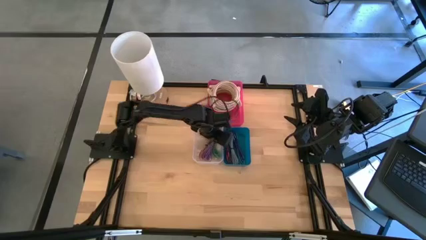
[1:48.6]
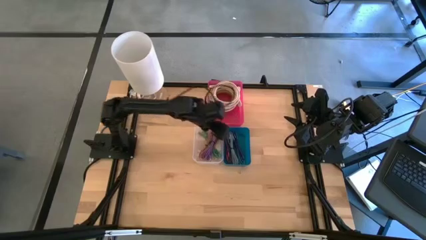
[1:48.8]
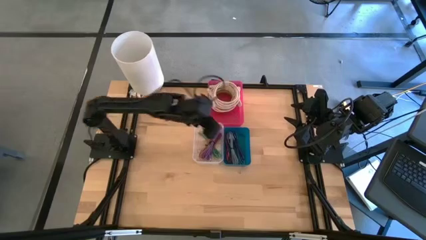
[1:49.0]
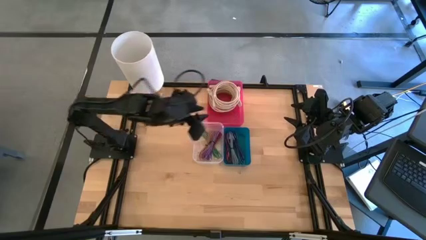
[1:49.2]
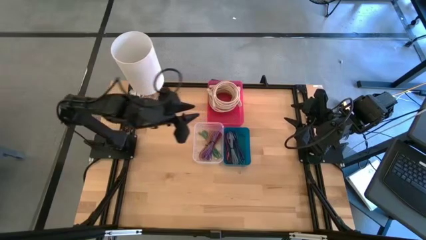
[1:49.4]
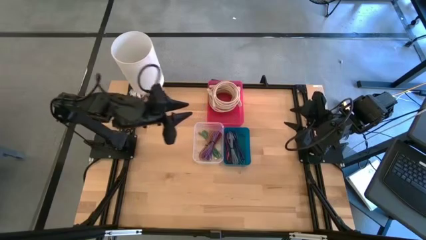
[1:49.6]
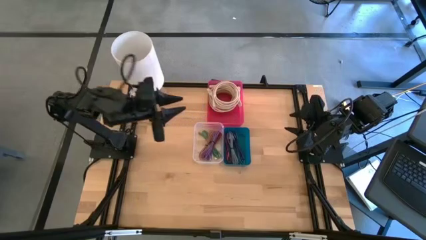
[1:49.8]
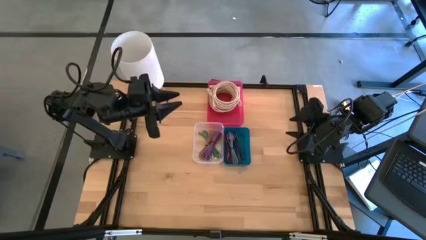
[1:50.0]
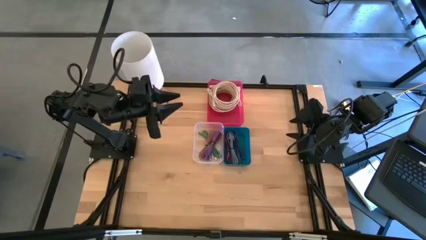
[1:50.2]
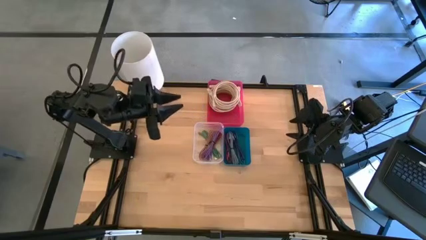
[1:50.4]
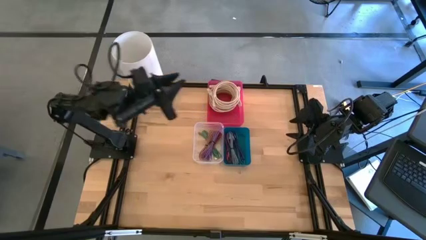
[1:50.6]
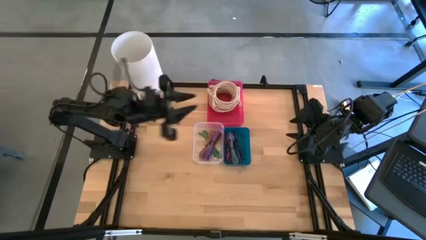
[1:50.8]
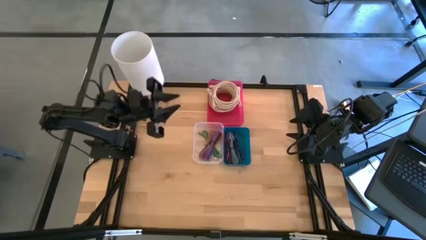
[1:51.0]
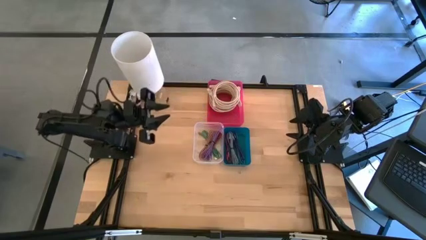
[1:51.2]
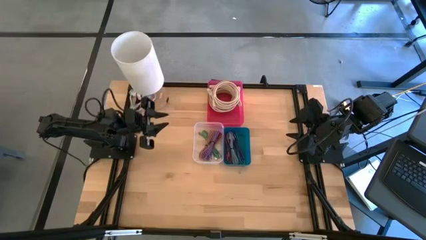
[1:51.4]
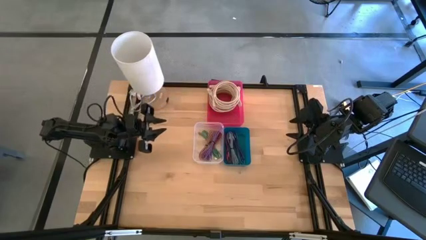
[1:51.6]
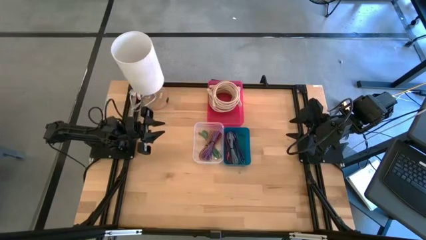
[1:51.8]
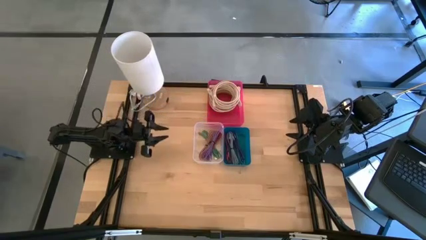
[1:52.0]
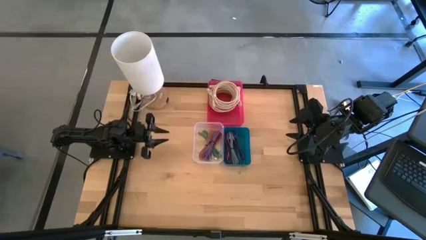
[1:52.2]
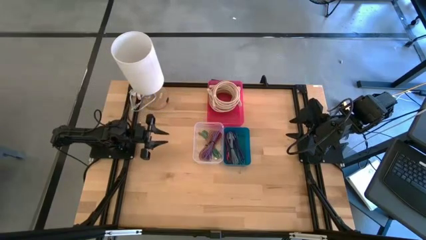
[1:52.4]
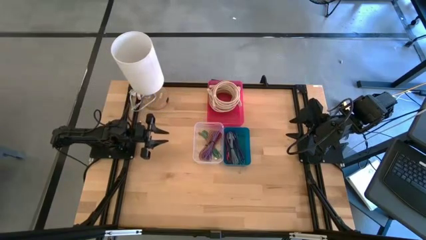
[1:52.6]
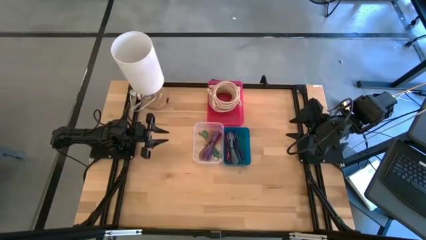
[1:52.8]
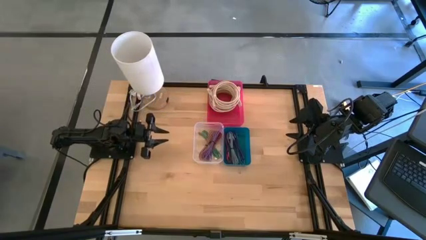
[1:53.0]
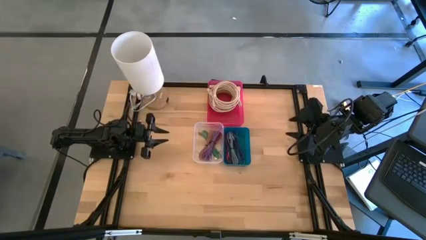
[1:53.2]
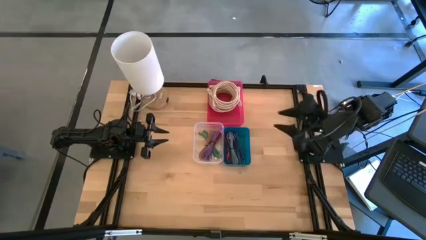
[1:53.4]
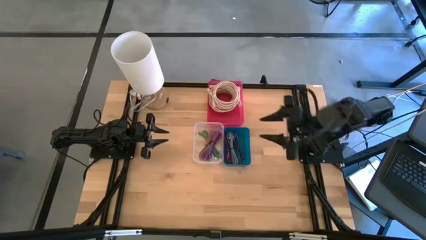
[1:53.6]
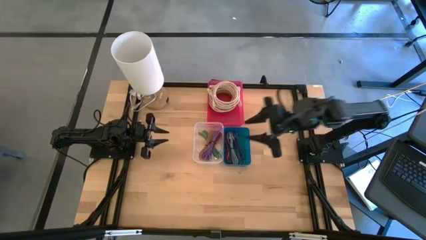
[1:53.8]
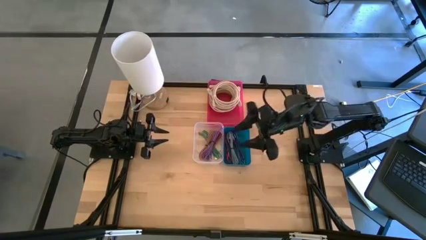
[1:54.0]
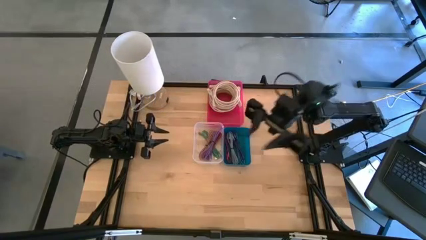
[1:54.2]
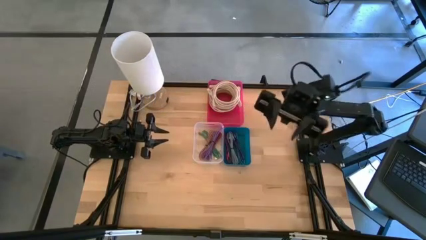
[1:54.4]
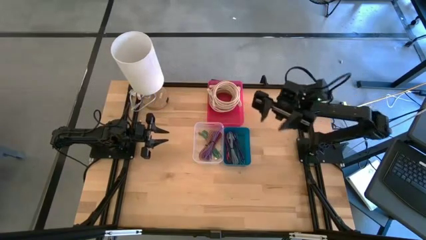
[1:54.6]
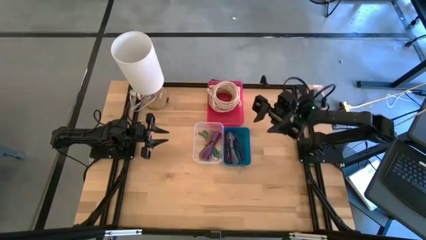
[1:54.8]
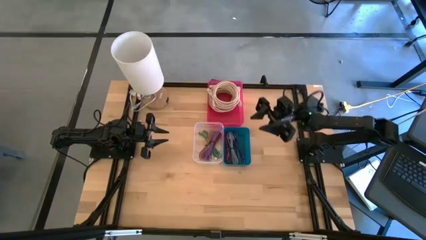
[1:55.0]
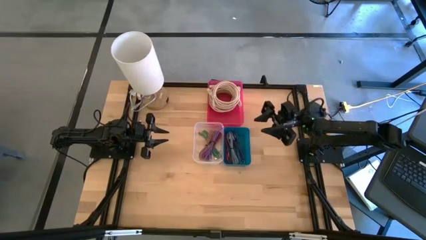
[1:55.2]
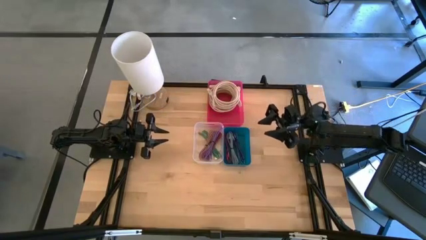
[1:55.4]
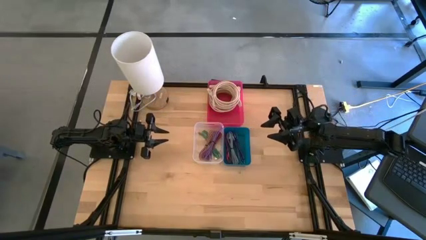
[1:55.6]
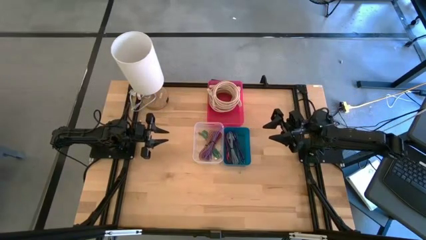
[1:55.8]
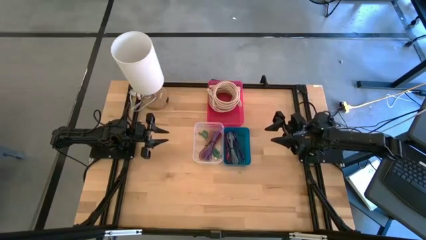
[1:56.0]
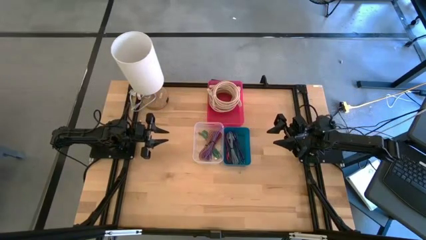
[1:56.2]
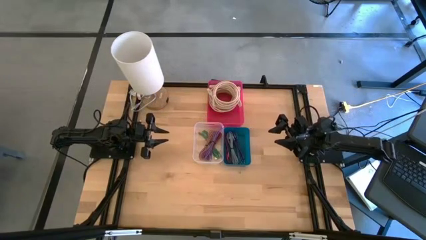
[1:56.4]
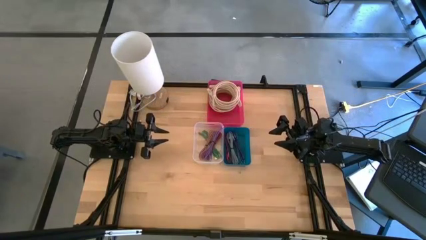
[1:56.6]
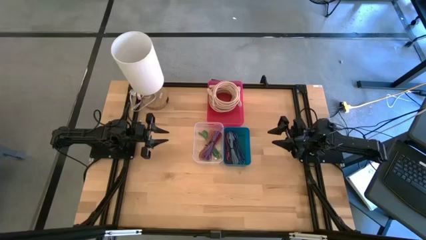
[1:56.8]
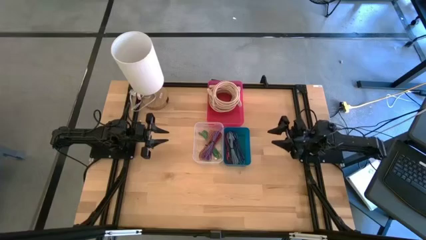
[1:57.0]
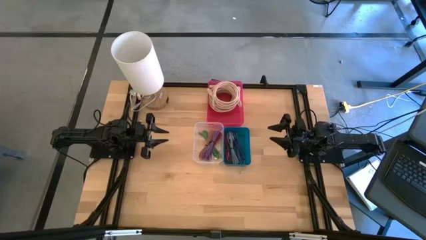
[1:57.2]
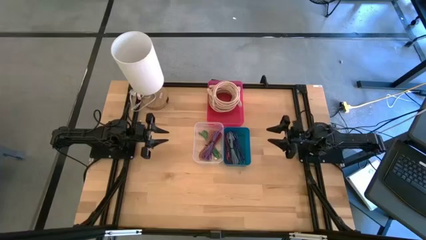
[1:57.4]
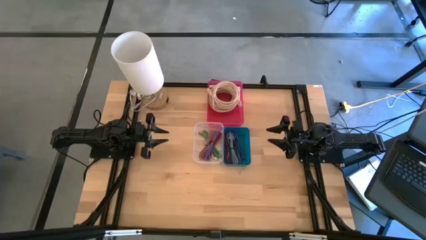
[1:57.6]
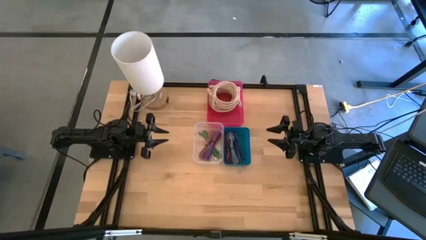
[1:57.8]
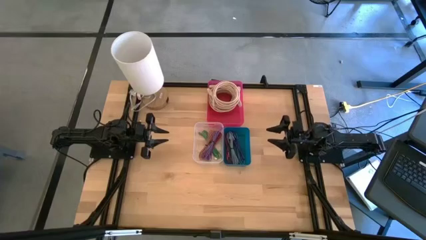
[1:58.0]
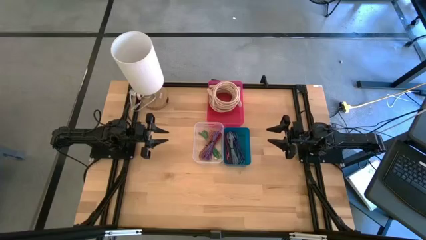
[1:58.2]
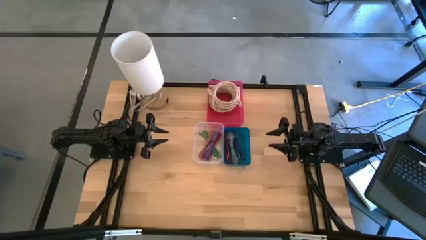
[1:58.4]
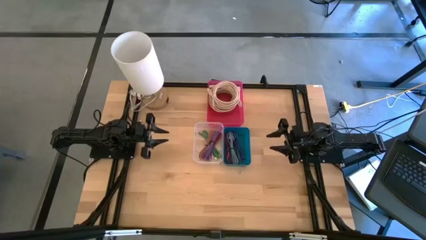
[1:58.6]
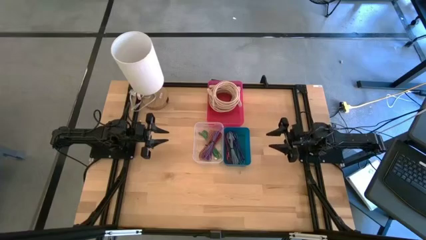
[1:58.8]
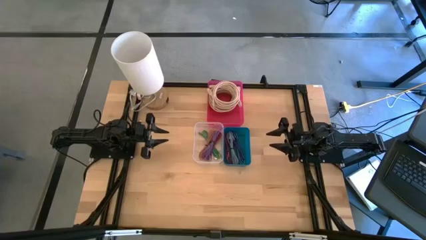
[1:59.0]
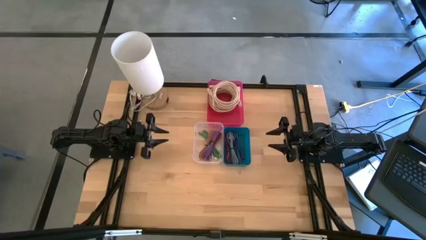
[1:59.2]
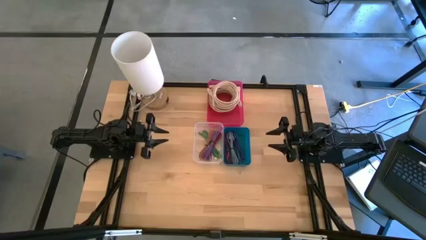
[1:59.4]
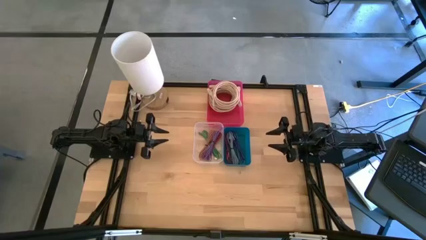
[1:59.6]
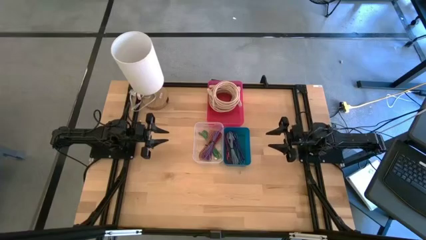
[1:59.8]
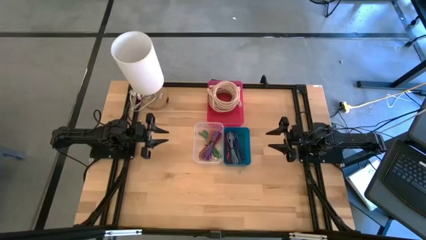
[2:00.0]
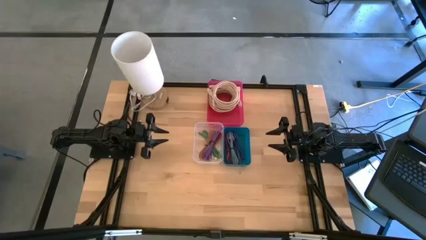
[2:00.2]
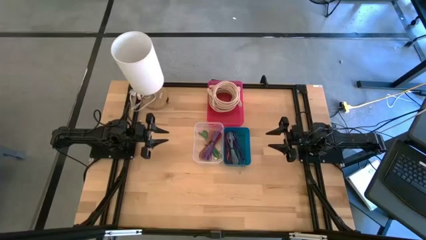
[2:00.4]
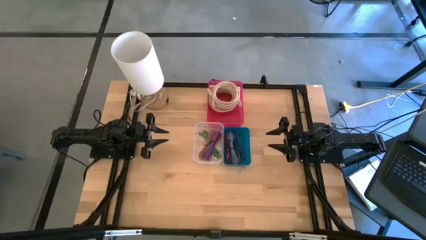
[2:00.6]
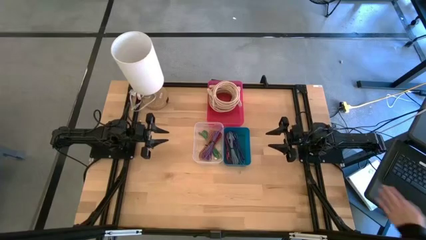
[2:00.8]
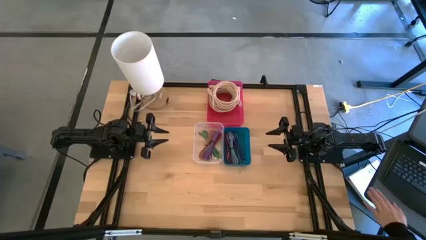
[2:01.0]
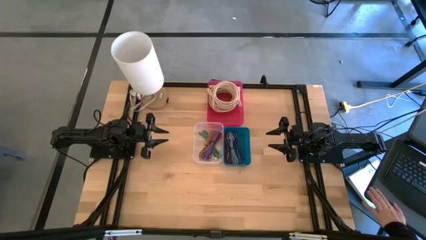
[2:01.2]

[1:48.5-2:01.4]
Task: Pick & Place USB Port
Return to Home Position

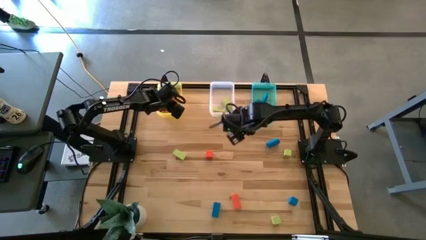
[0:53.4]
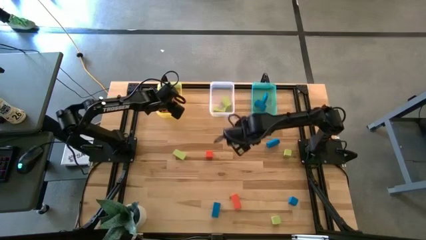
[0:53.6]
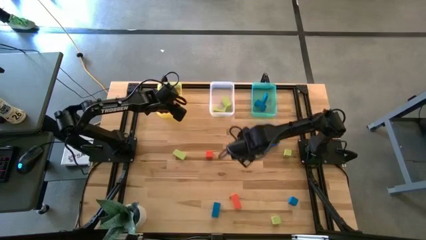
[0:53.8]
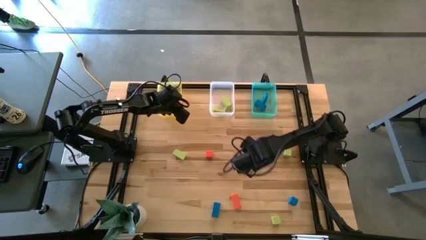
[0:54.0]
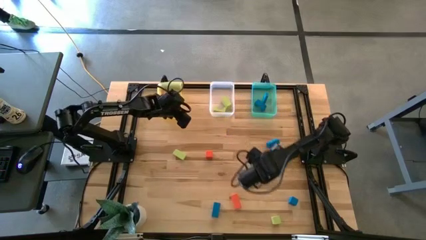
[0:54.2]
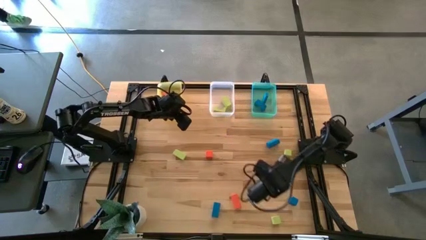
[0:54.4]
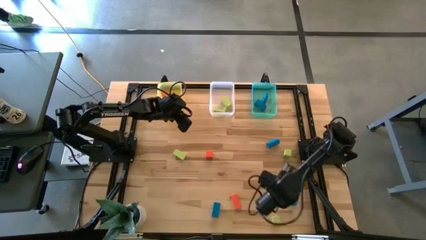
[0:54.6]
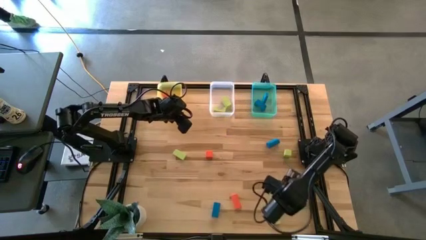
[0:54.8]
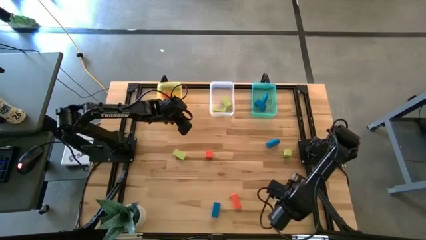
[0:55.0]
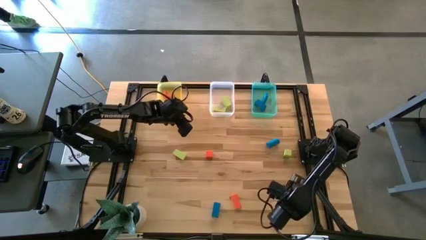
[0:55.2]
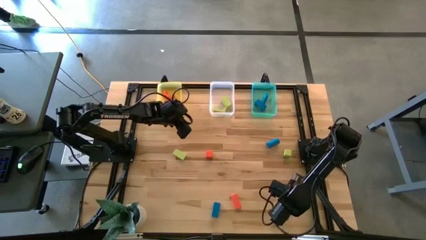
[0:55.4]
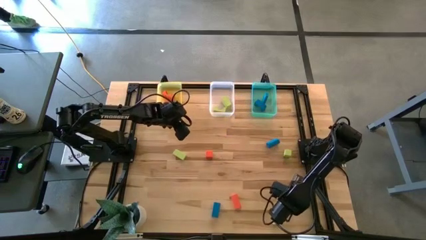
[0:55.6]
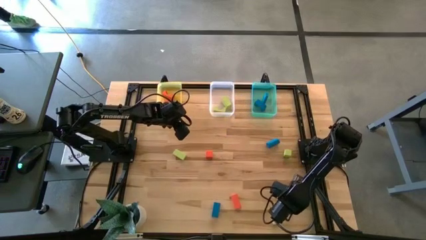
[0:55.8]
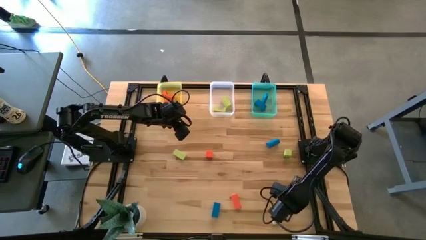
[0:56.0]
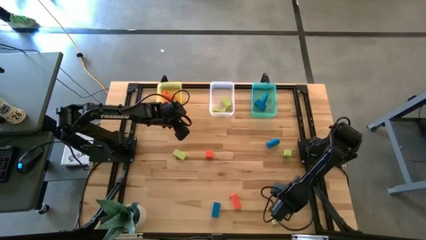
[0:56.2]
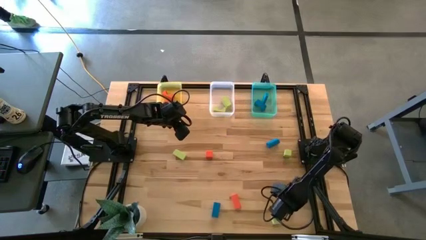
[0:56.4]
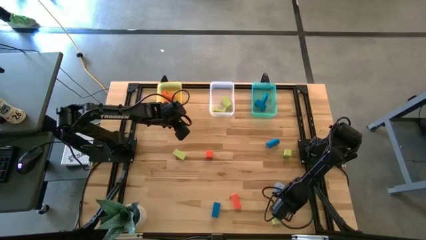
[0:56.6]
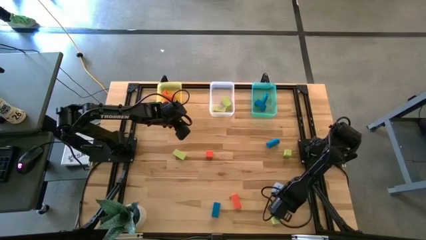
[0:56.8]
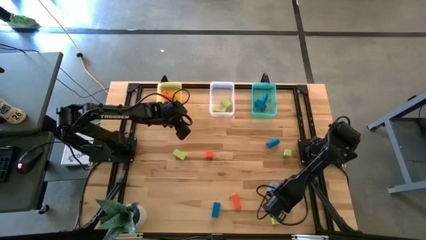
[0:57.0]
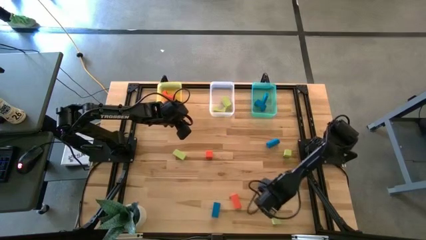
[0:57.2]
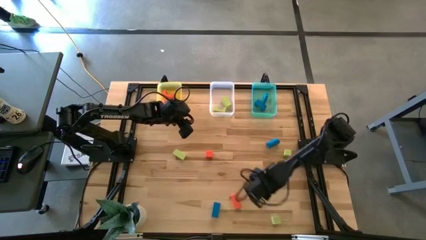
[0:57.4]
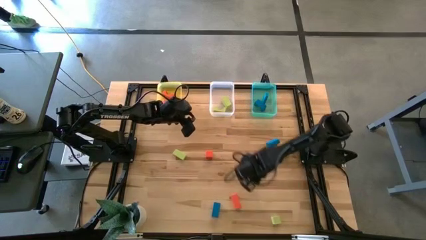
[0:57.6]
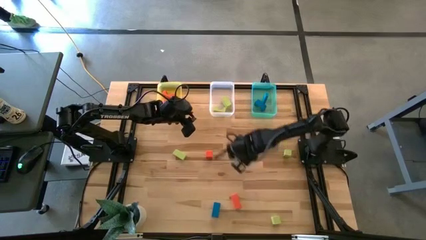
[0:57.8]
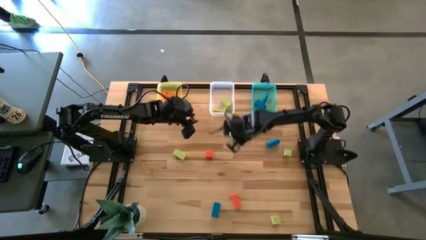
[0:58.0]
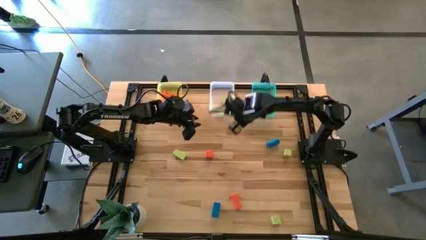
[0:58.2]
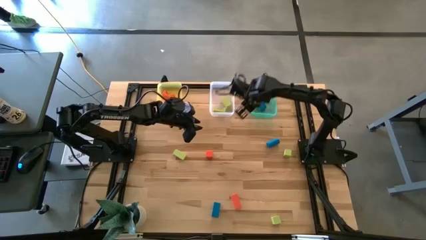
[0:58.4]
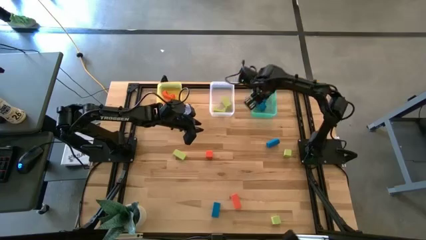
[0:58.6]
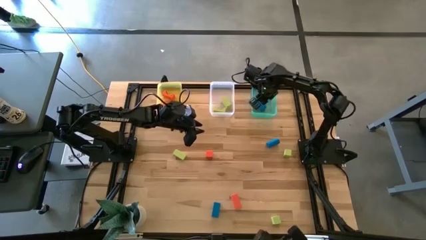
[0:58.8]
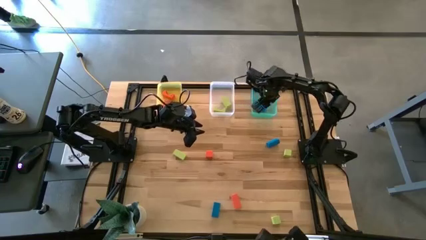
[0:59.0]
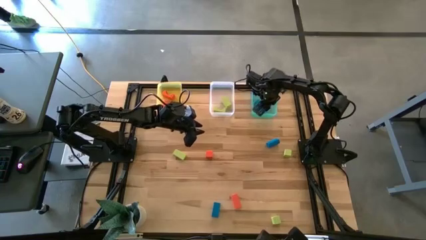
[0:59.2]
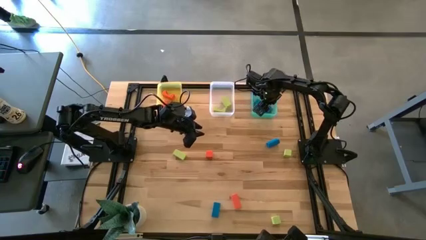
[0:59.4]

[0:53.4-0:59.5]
Task: Sort & place blocks by color
Put the blue block into the green bin
